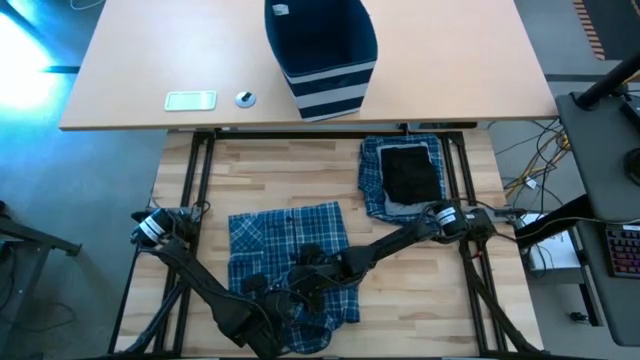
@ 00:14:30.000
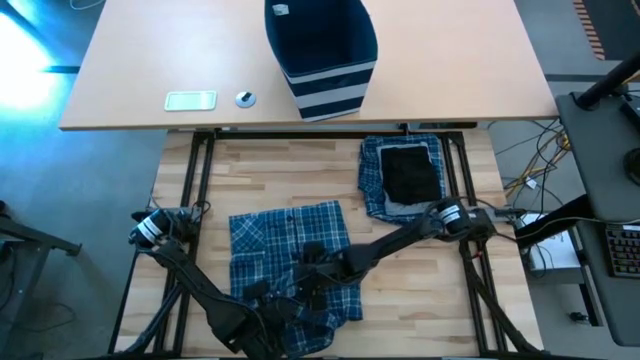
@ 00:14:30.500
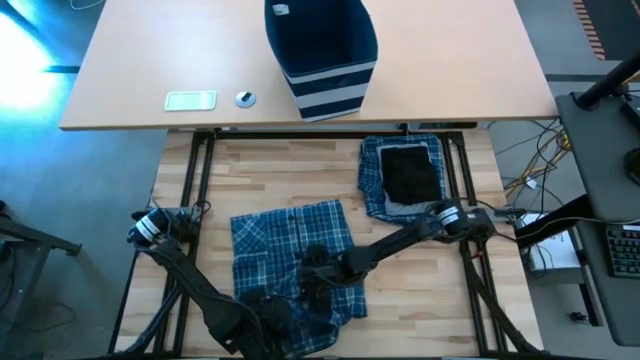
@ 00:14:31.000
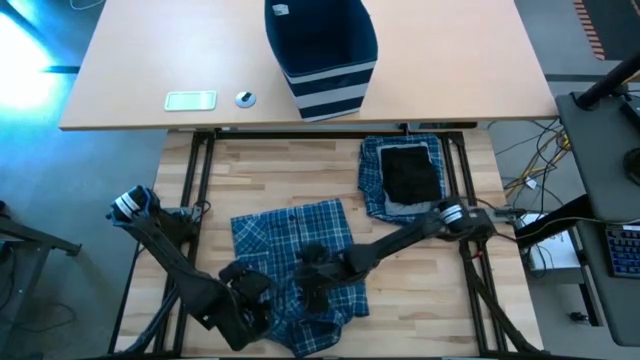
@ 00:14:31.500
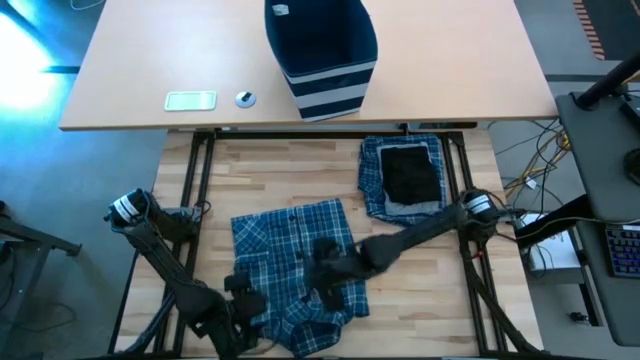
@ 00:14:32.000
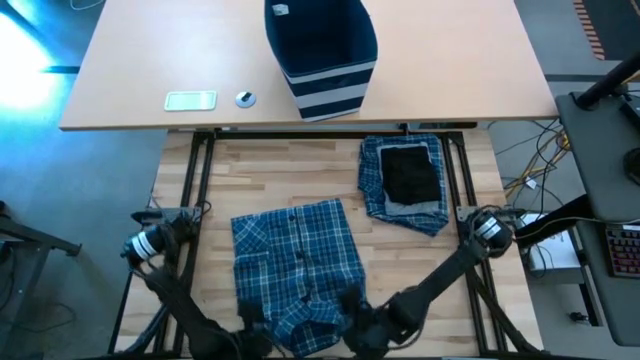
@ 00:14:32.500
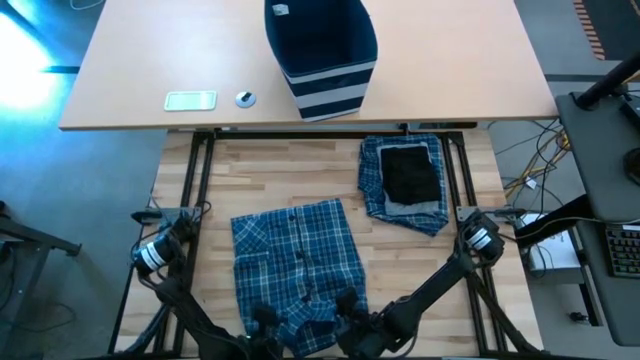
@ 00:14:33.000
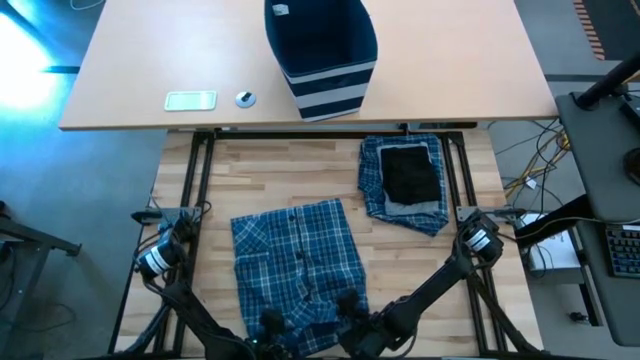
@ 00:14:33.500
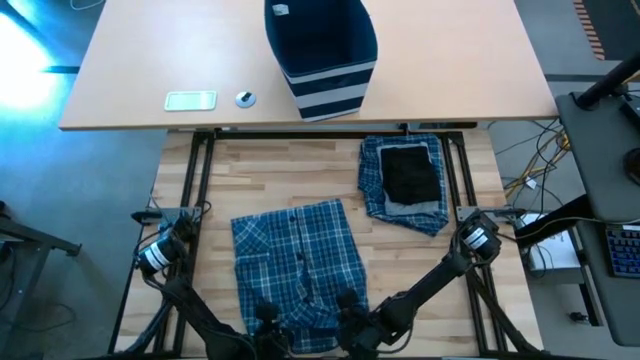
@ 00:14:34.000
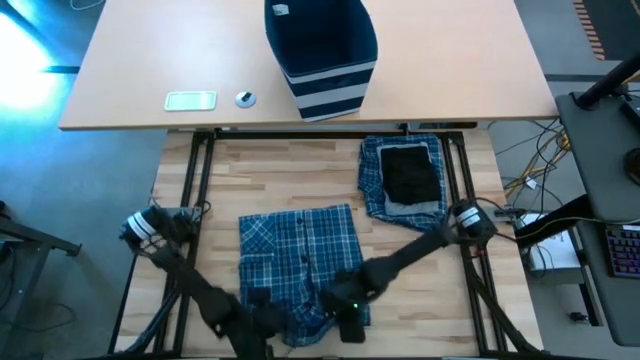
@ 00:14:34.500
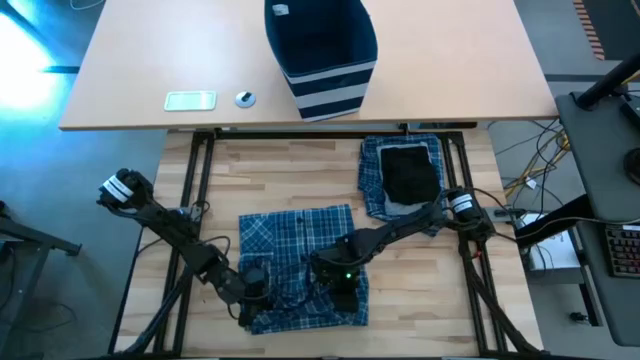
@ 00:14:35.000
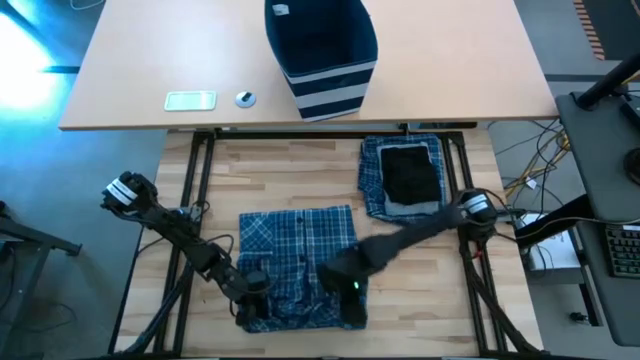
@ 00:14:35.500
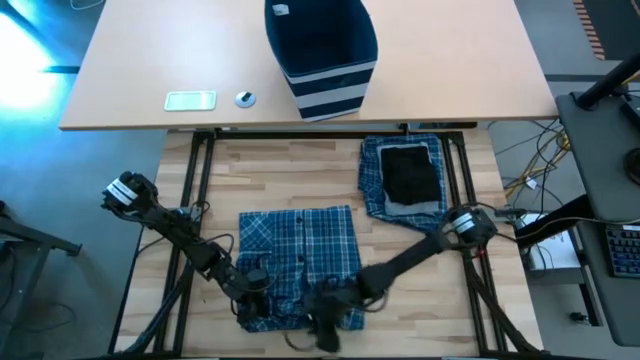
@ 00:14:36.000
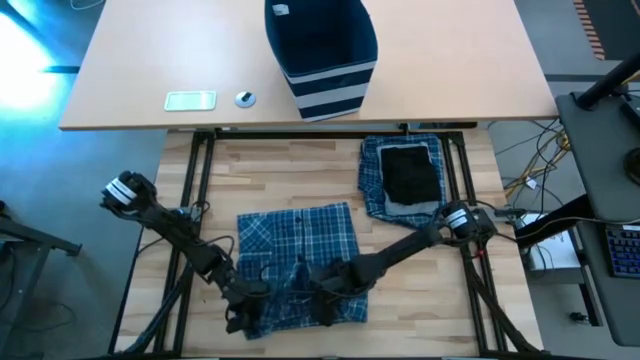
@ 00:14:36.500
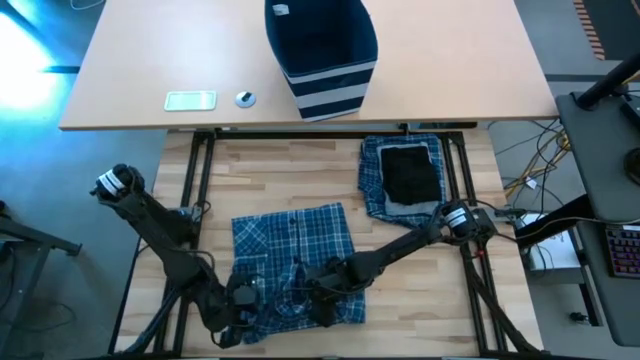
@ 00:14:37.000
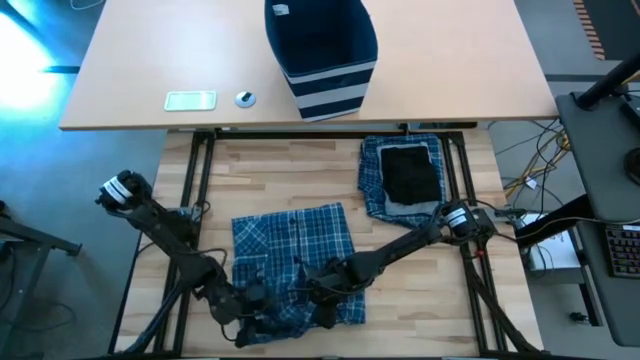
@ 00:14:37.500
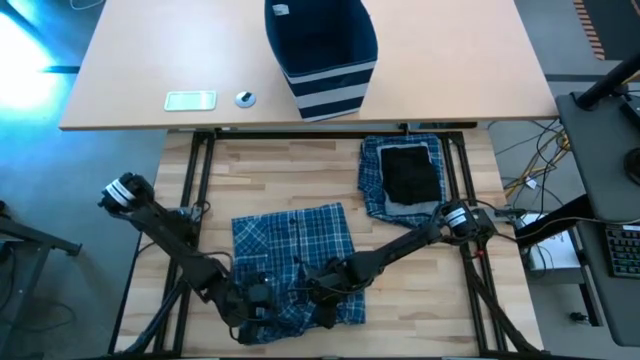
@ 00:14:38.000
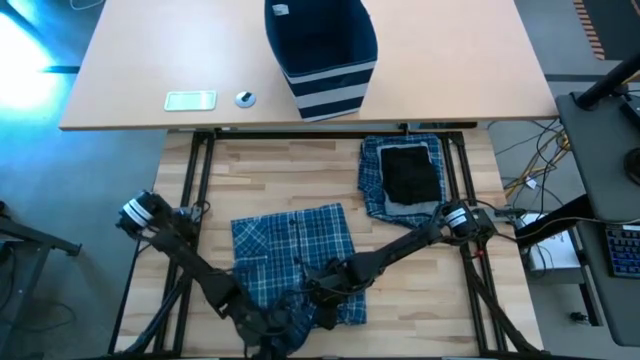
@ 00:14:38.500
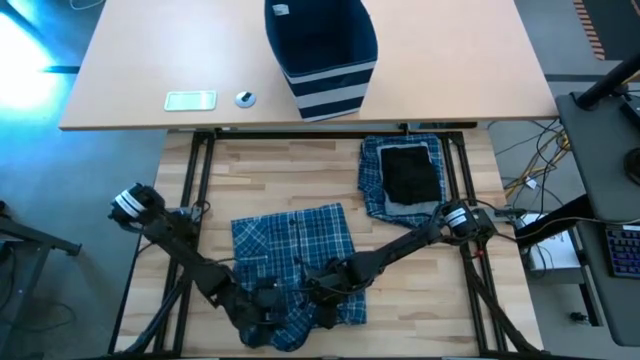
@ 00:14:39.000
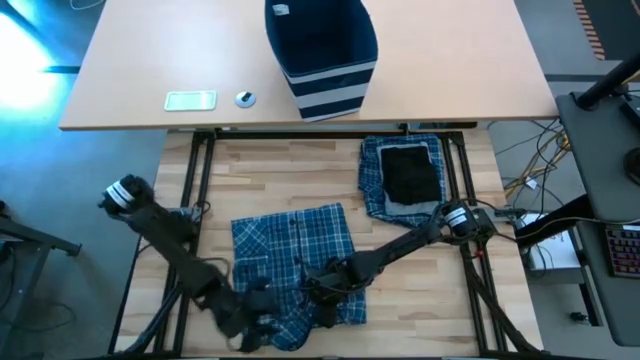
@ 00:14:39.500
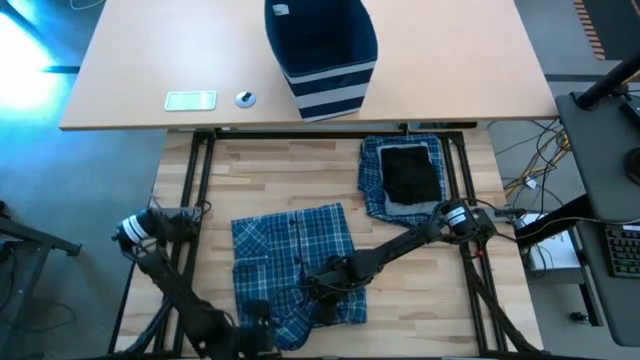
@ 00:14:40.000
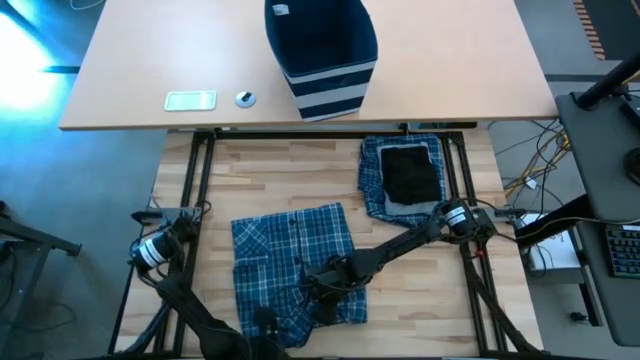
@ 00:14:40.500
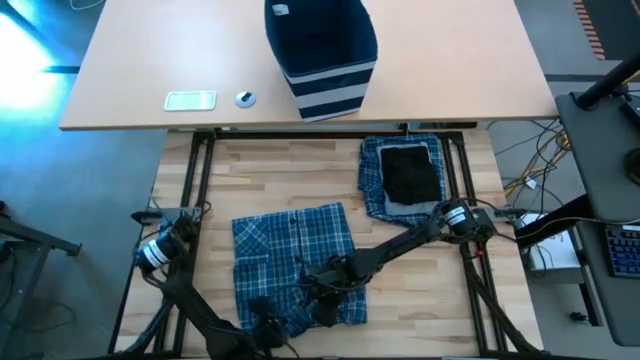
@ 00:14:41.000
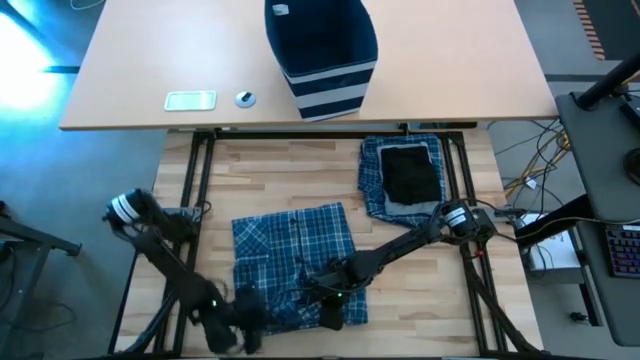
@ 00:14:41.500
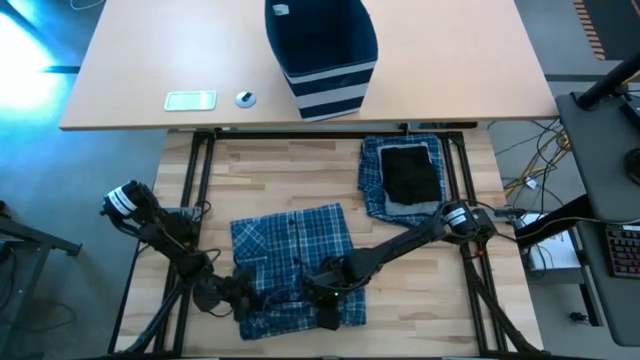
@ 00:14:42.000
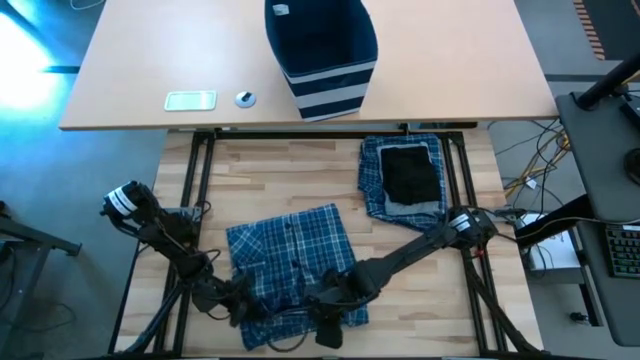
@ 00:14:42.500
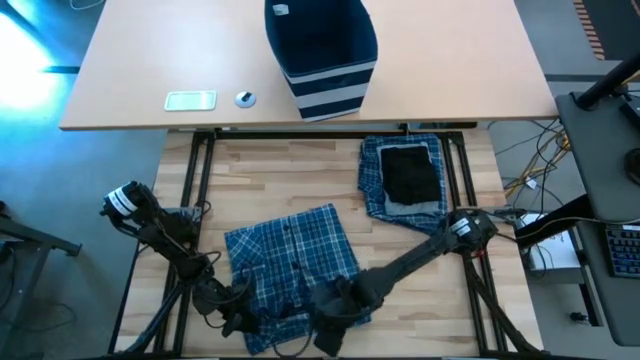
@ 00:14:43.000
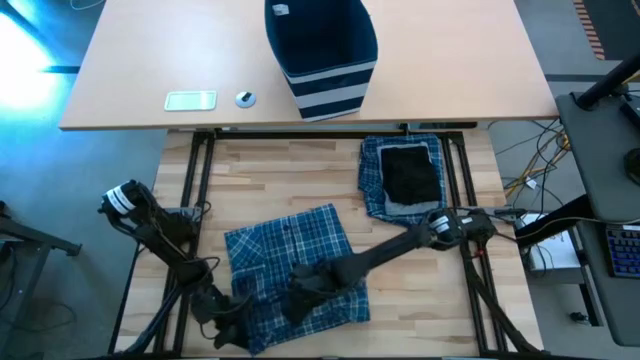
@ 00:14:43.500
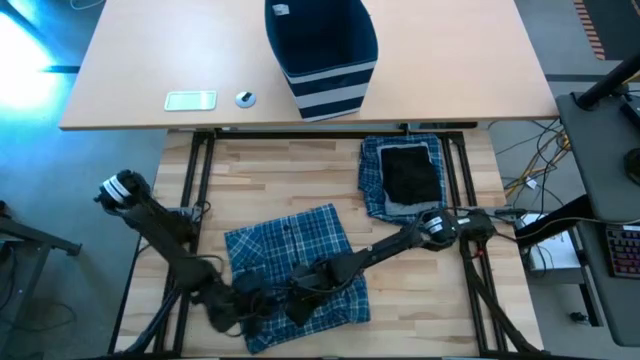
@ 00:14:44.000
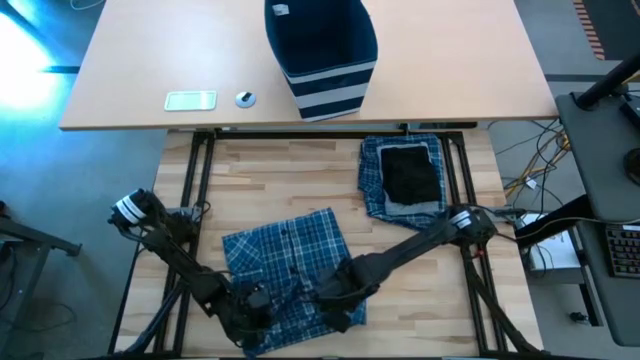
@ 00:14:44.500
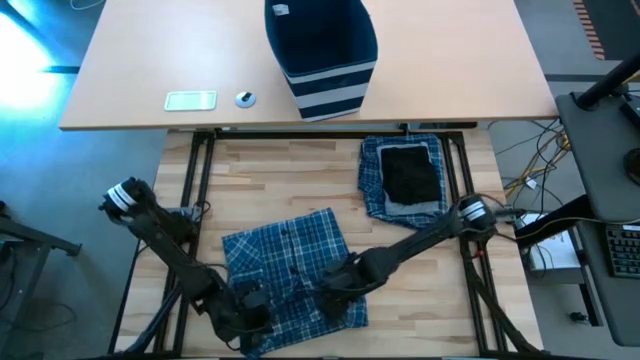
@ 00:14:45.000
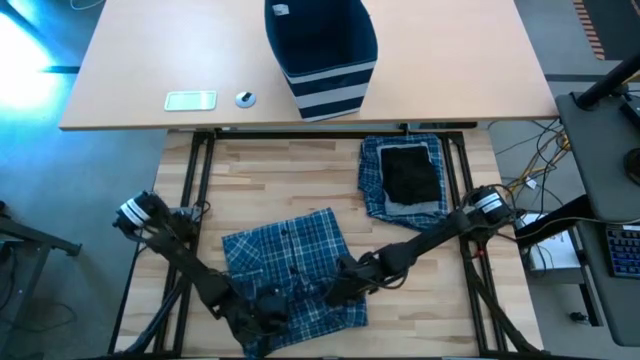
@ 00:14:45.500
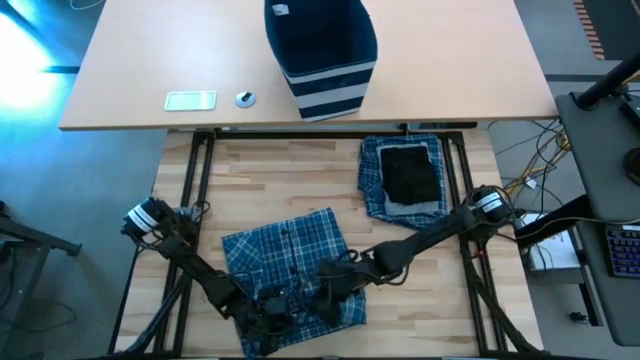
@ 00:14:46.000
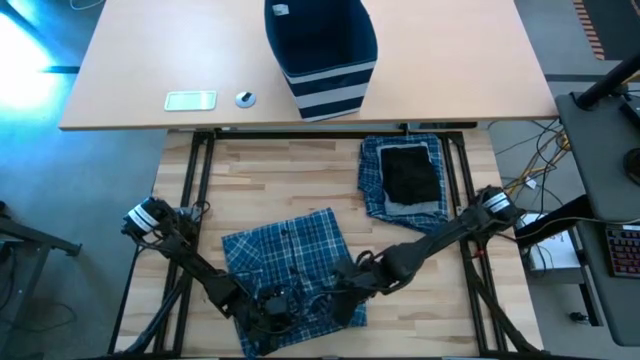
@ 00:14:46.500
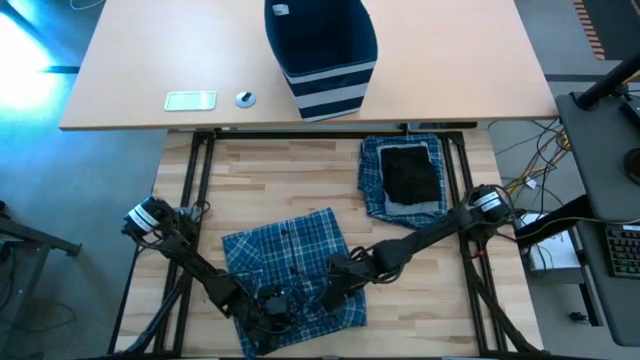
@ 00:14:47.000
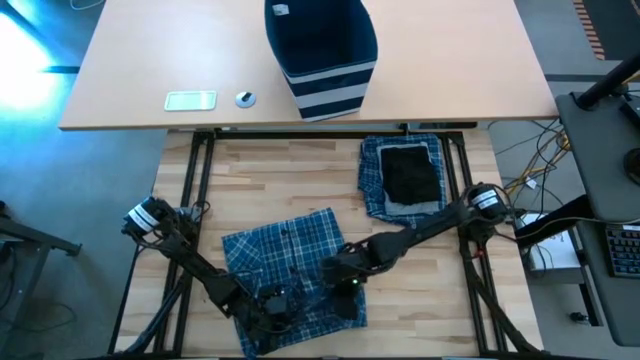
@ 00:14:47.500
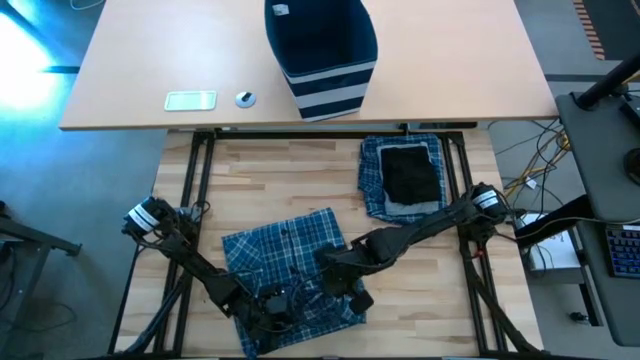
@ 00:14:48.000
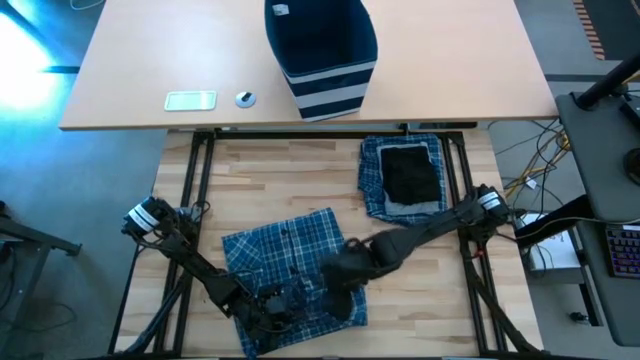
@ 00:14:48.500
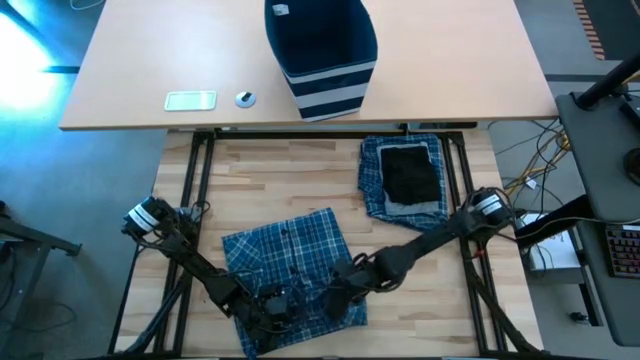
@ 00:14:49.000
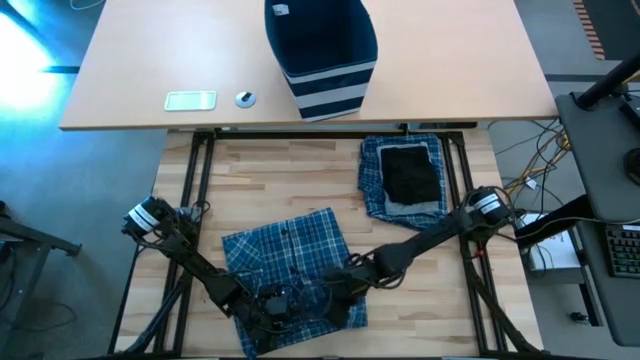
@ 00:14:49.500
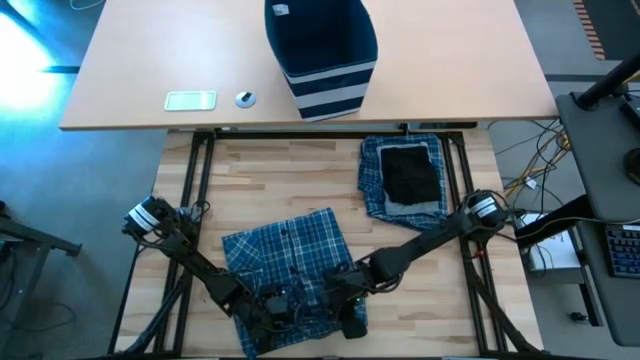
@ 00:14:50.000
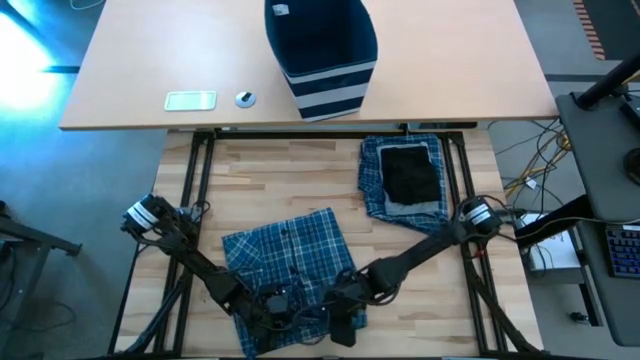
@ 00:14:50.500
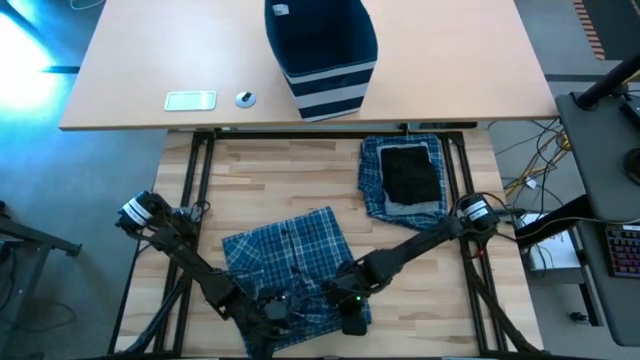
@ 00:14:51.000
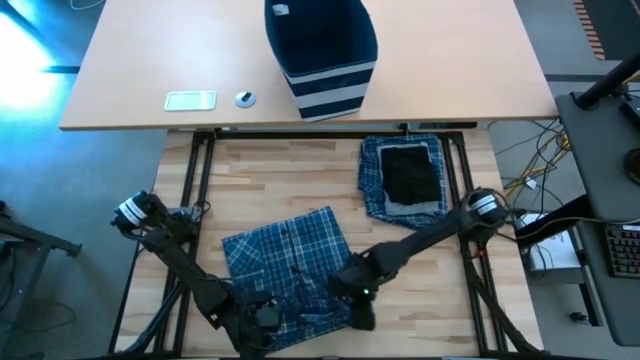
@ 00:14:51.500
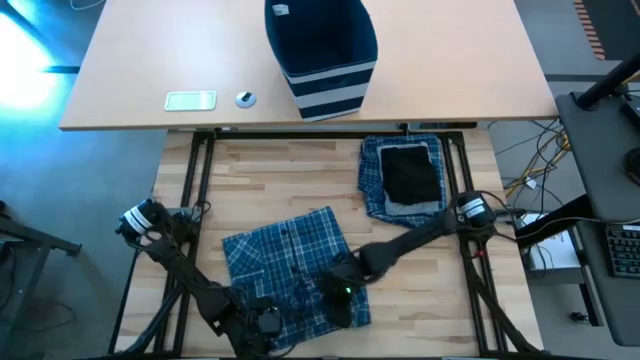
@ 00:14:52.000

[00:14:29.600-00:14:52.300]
Task: Fold Laundry from Bin
Fold the blue patterned long sleeve
